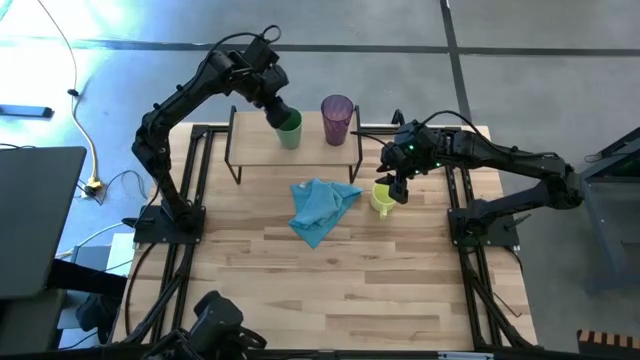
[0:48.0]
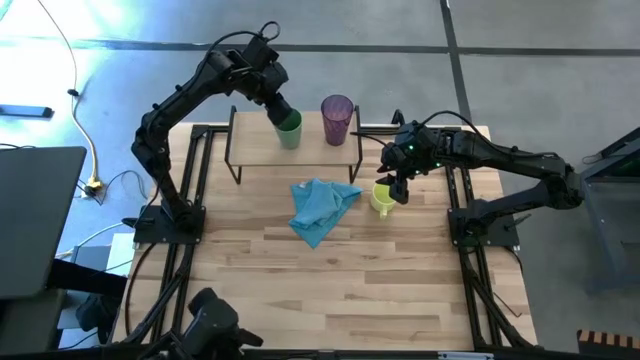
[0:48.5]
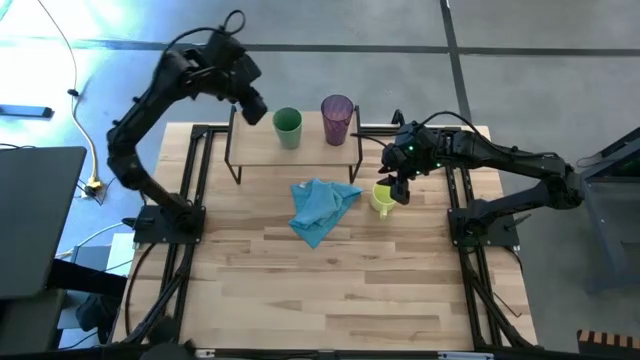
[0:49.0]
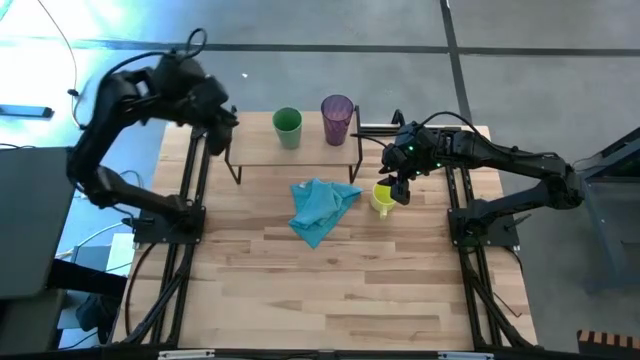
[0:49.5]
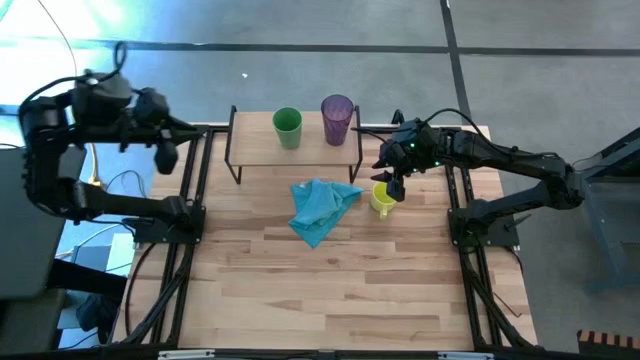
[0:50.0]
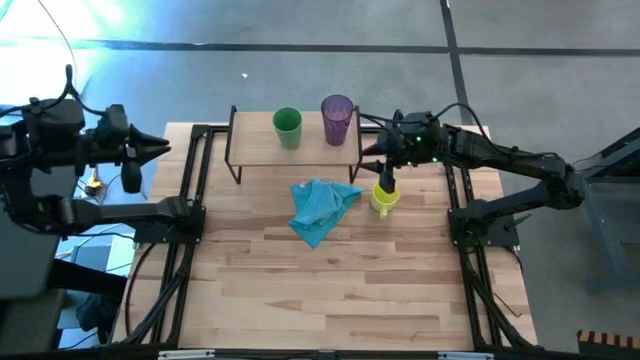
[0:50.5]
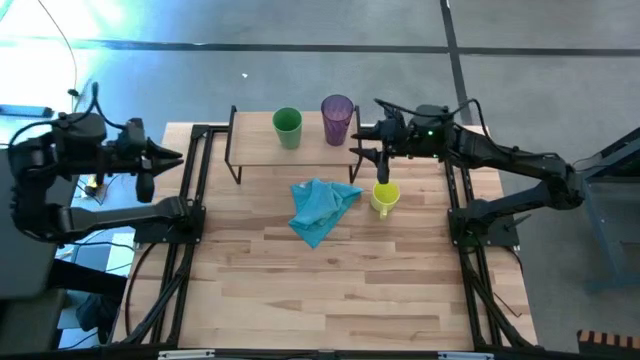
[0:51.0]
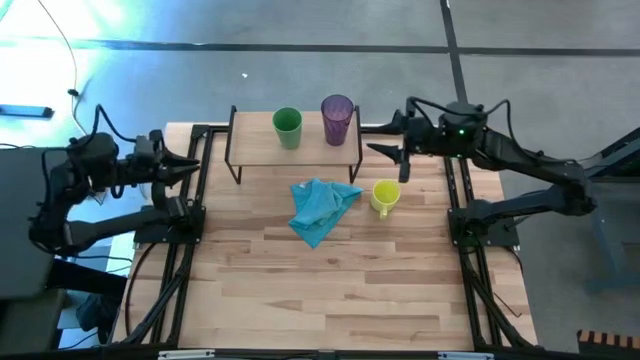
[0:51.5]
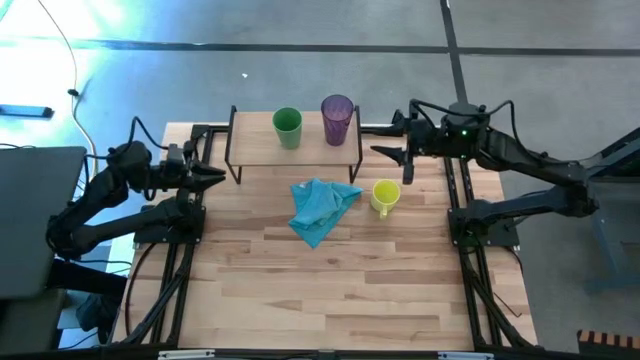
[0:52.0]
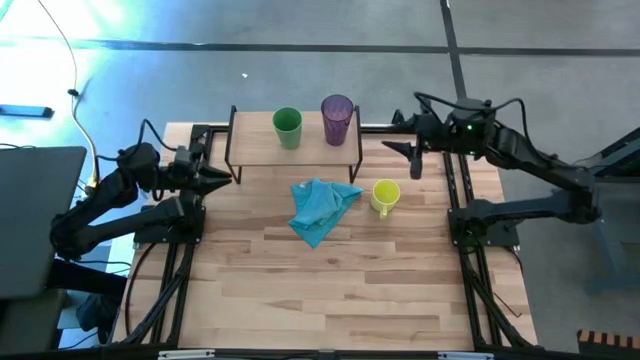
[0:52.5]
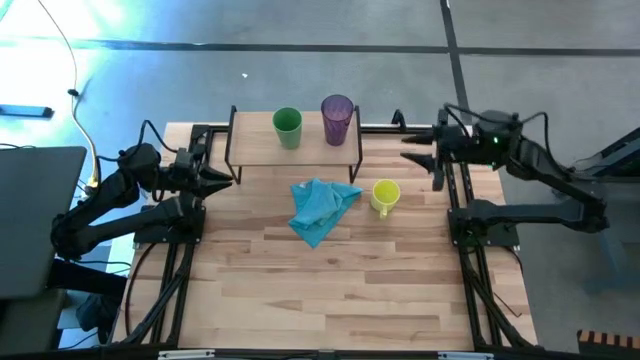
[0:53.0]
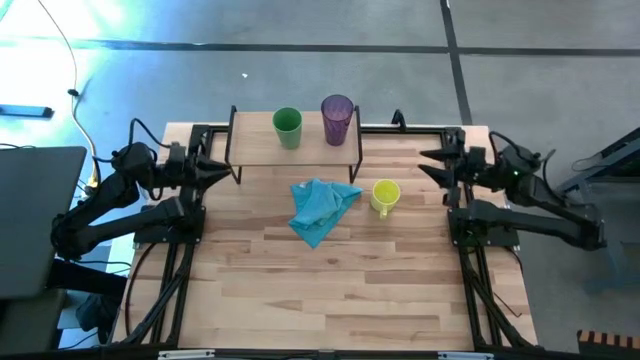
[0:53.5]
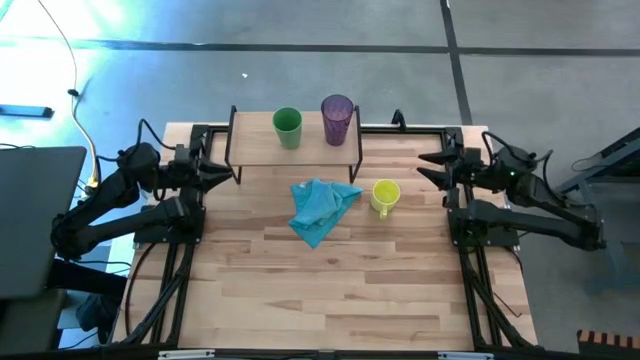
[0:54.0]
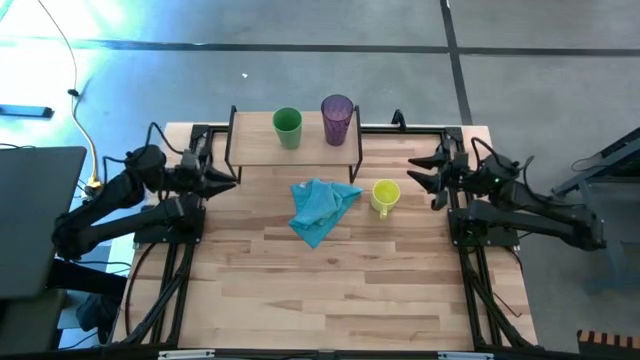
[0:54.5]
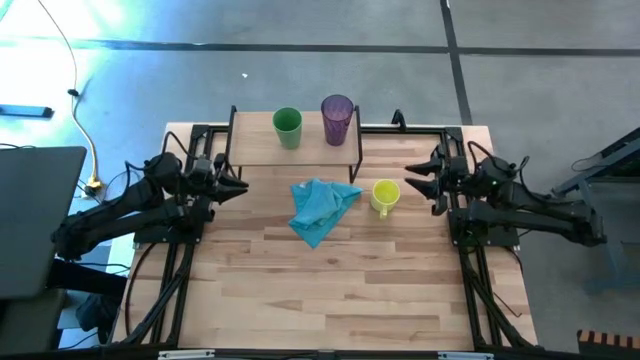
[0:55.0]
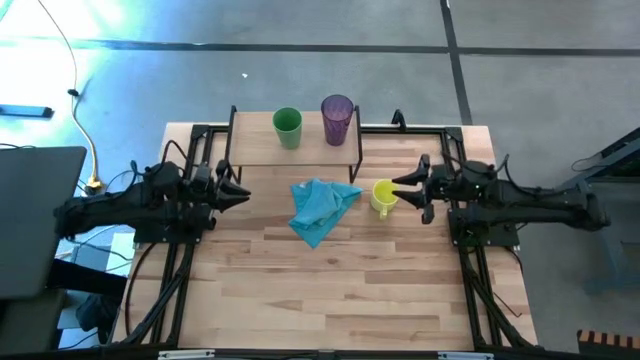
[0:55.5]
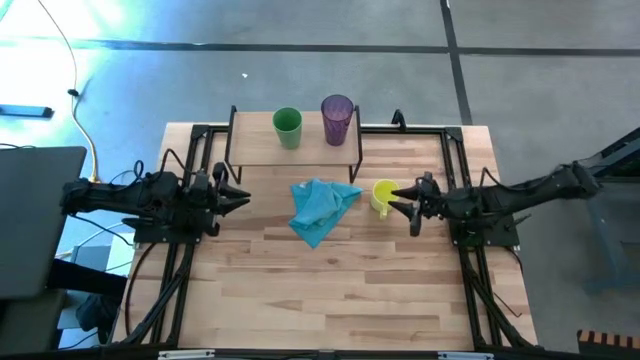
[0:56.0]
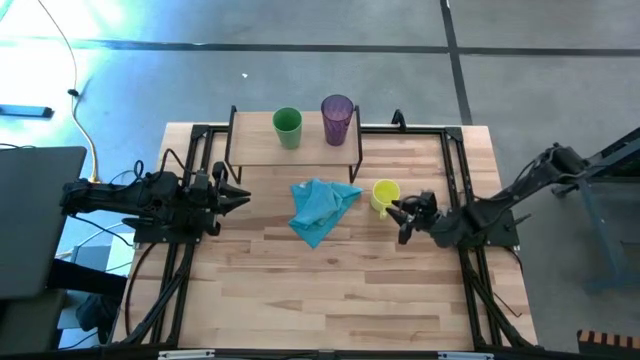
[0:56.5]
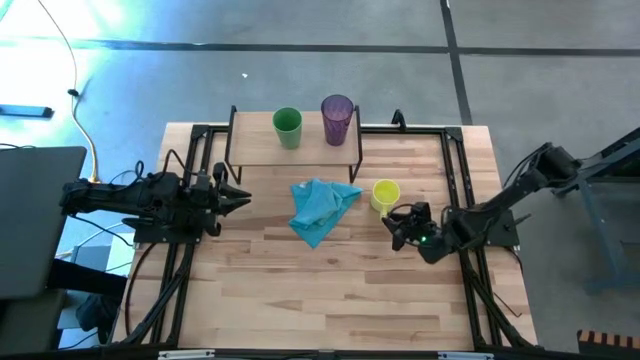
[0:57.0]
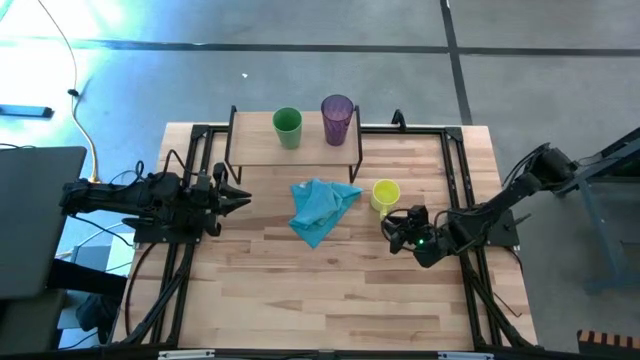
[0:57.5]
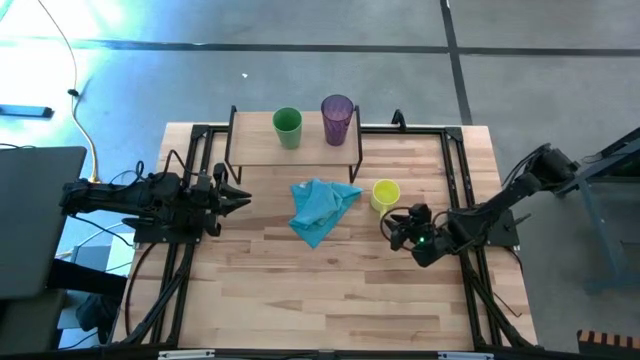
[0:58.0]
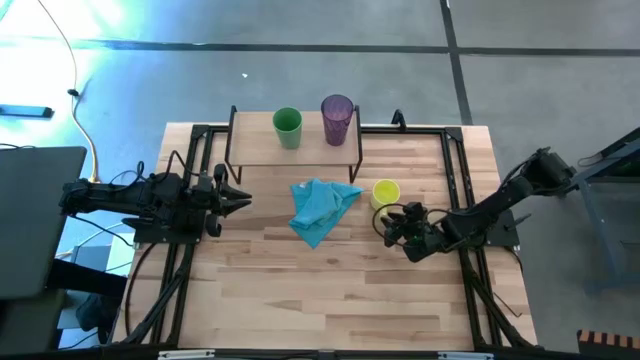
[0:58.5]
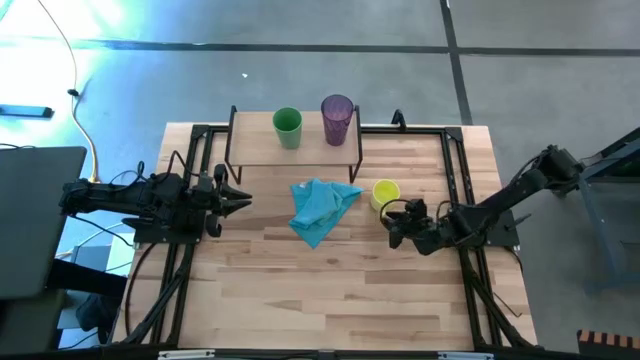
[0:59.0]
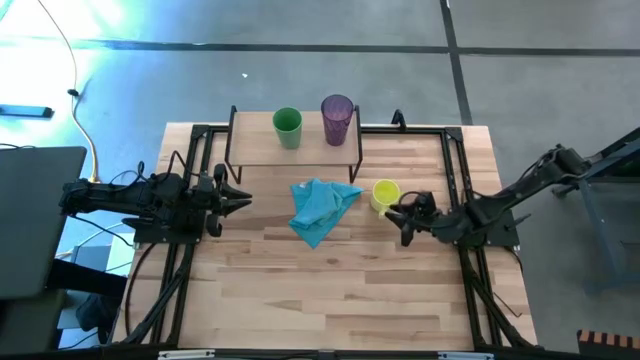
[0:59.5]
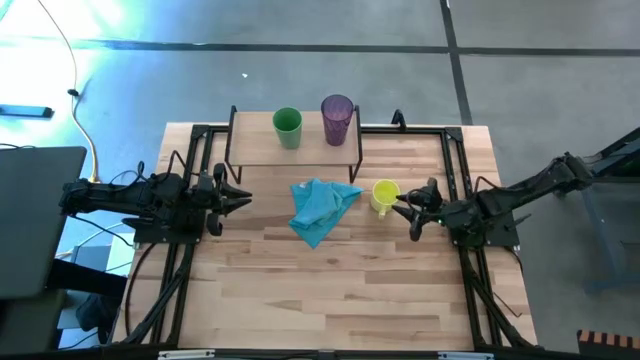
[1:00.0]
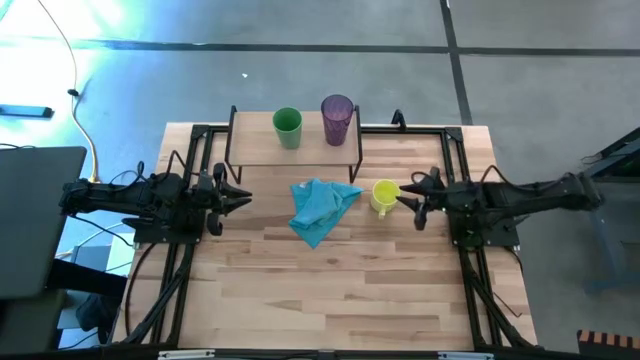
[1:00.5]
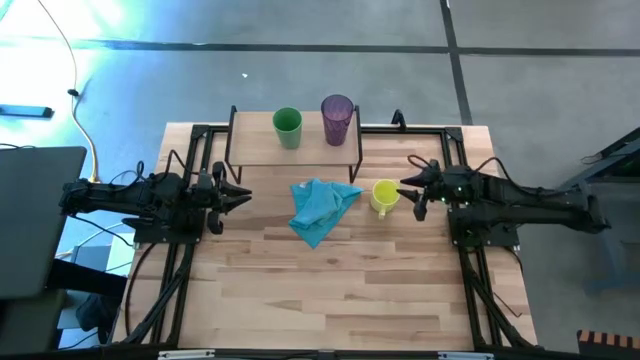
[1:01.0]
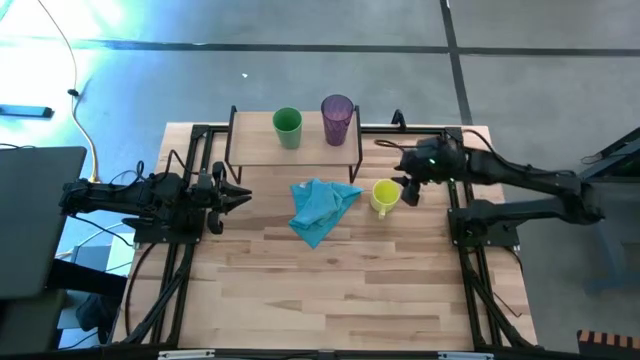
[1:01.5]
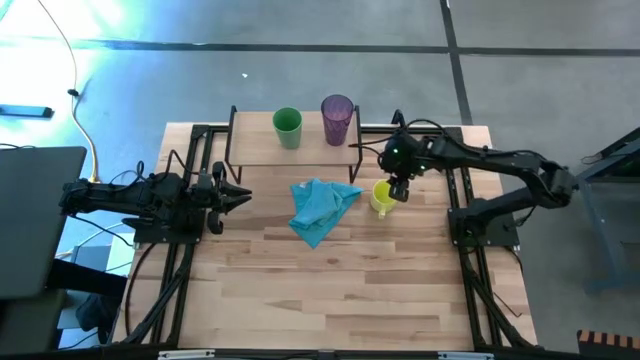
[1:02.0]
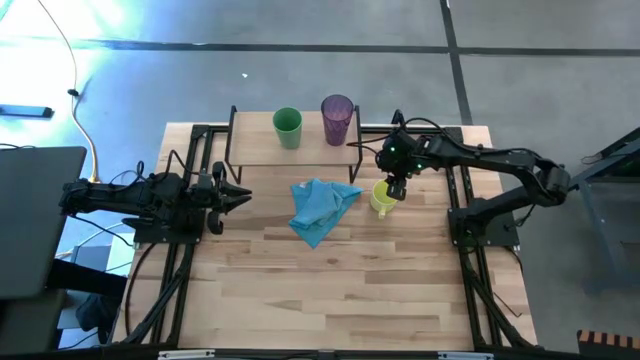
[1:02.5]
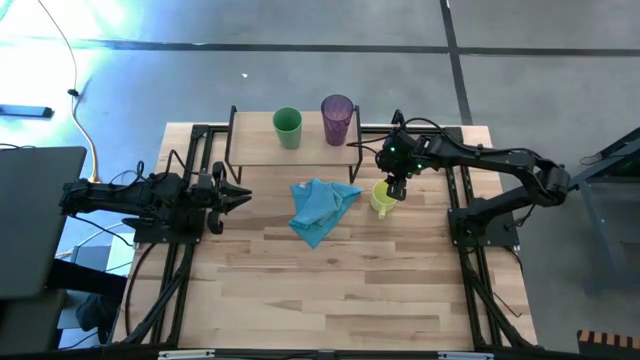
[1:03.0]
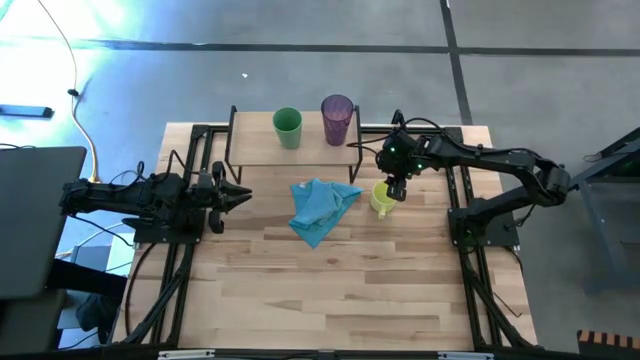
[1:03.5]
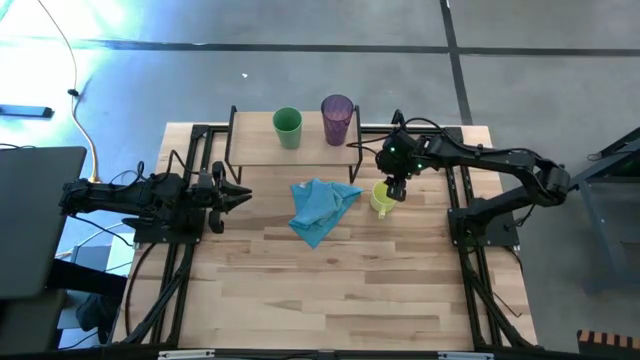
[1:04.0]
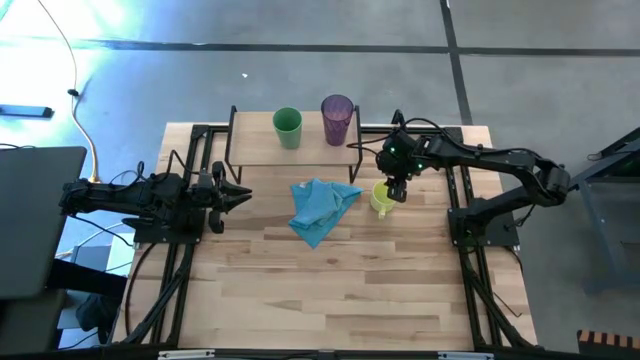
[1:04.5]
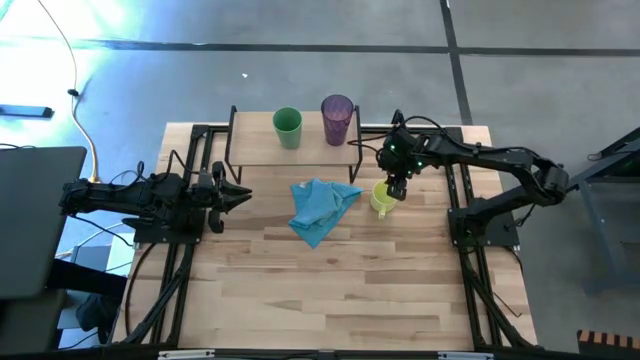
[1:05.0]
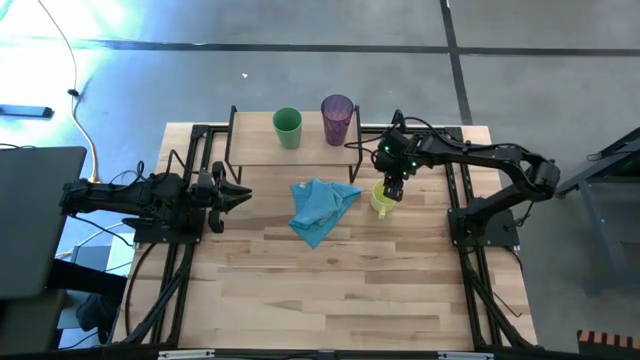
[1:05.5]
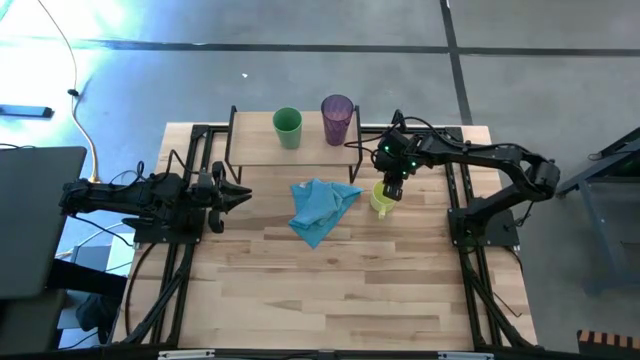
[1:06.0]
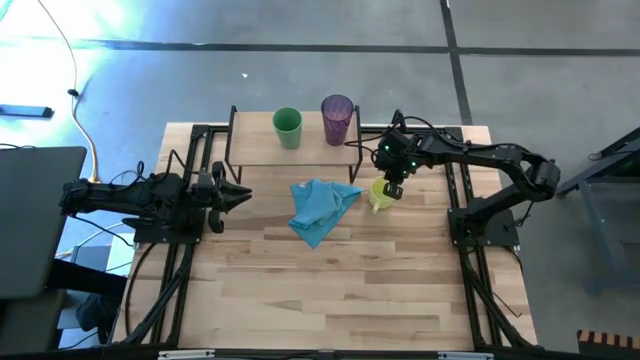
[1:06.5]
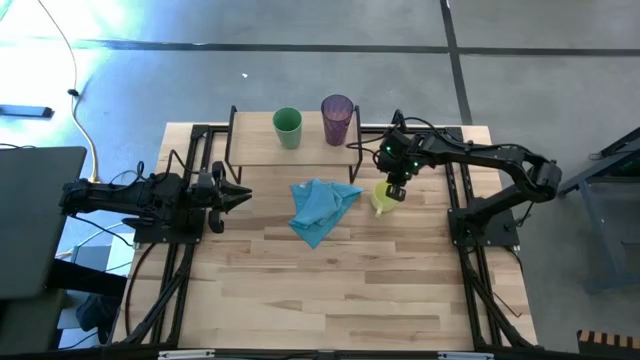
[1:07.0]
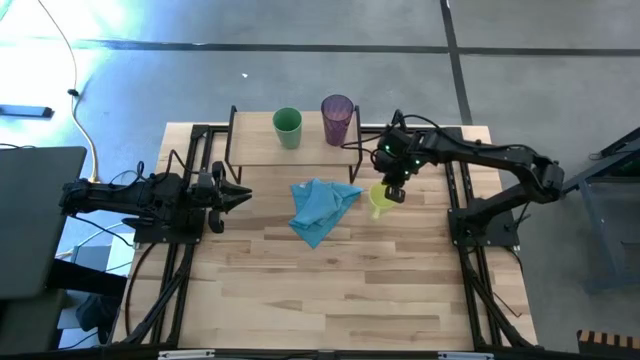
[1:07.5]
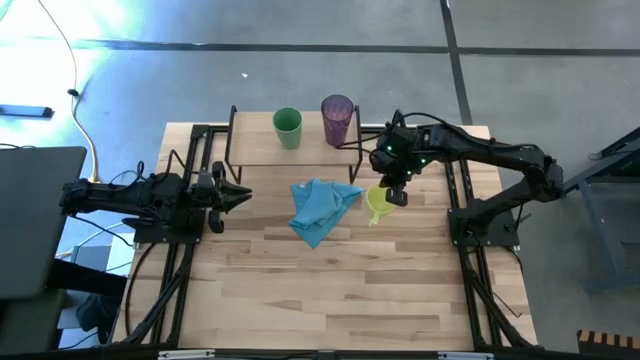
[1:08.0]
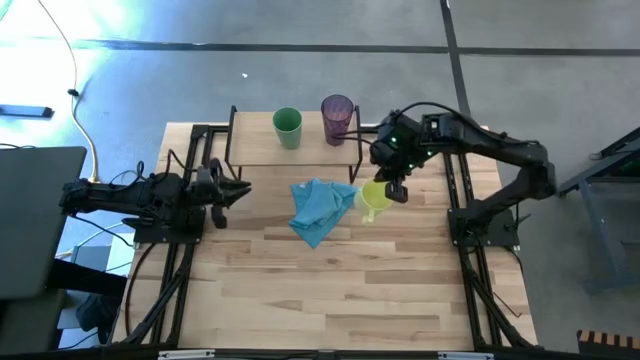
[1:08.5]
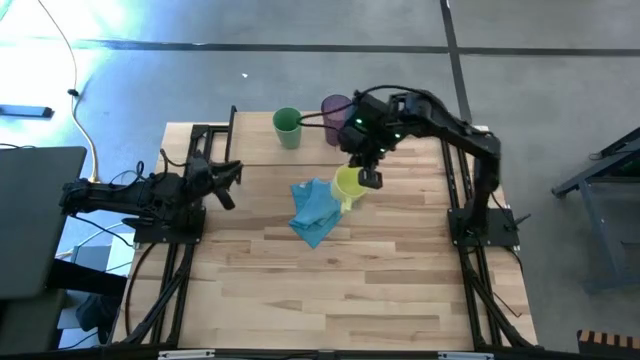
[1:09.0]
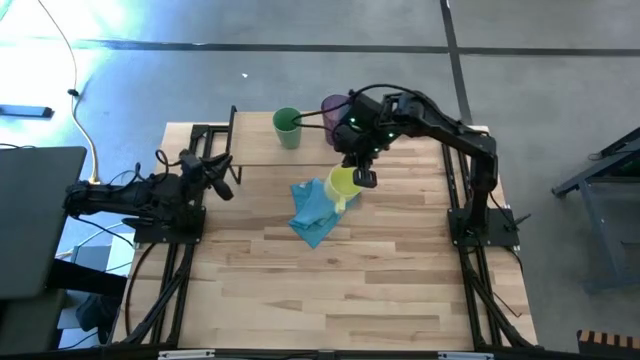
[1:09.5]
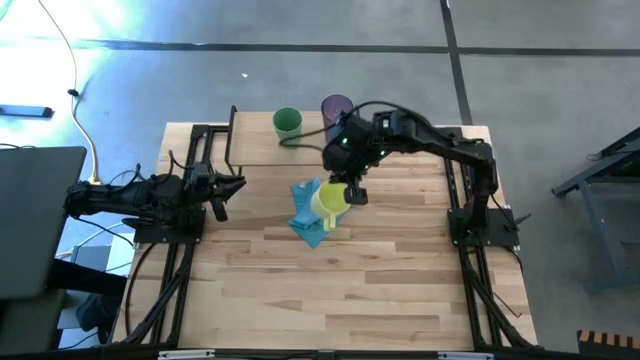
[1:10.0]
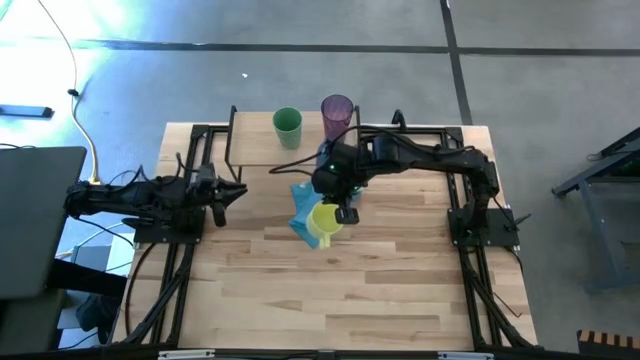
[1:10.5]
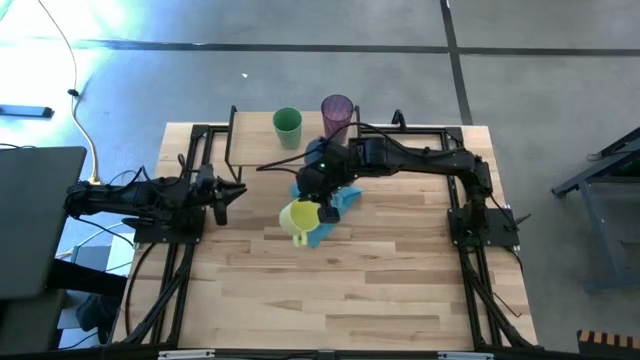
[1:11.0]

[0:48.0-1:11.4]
Task: Stack small to large cups/mugs on shelf
Put the yellow mug on the shelf
